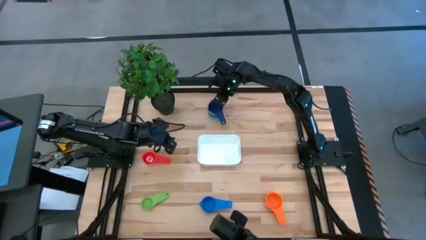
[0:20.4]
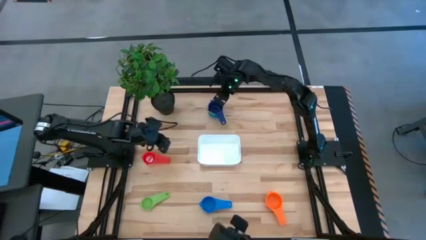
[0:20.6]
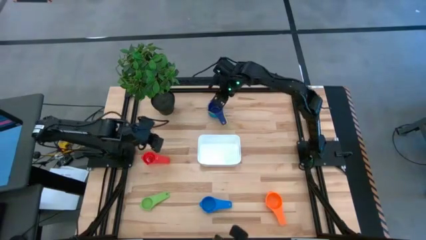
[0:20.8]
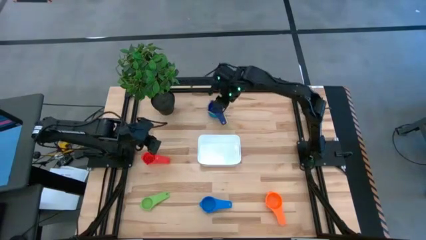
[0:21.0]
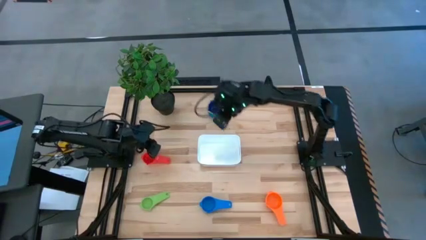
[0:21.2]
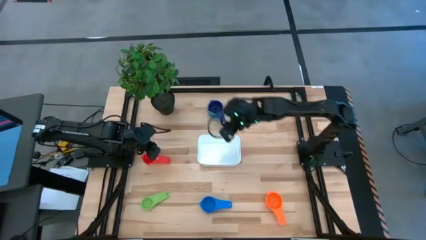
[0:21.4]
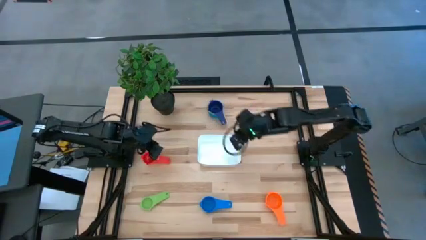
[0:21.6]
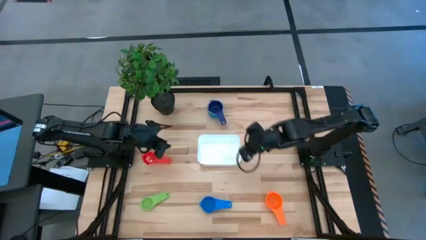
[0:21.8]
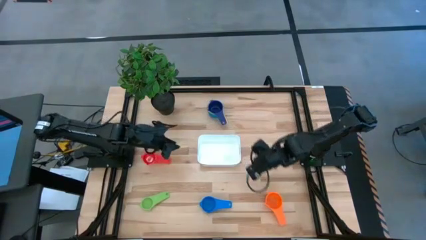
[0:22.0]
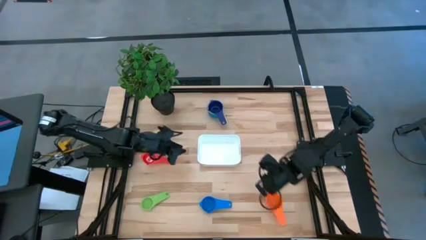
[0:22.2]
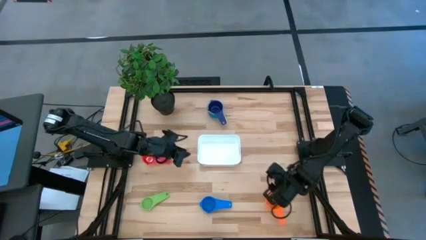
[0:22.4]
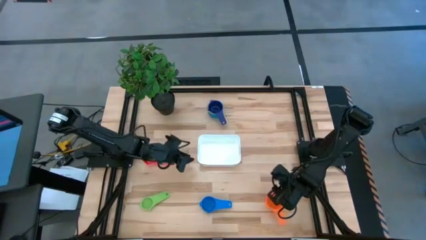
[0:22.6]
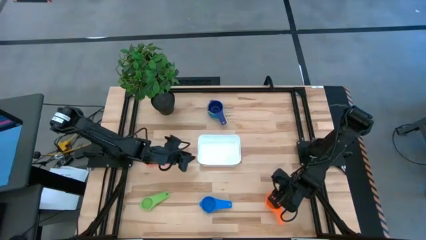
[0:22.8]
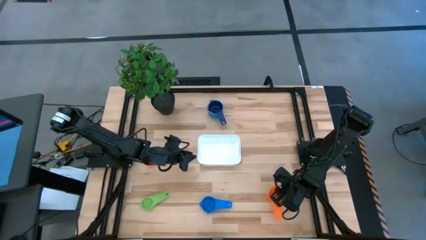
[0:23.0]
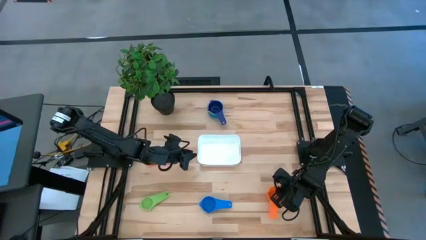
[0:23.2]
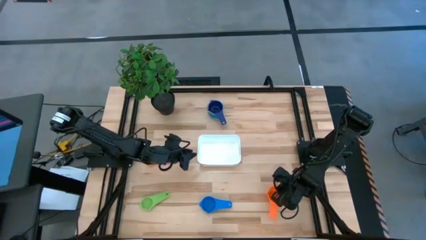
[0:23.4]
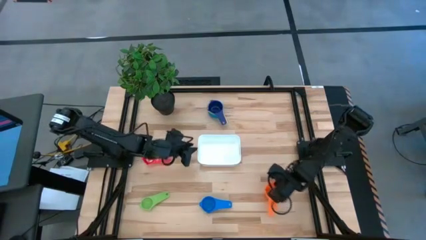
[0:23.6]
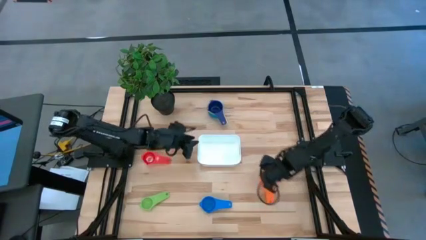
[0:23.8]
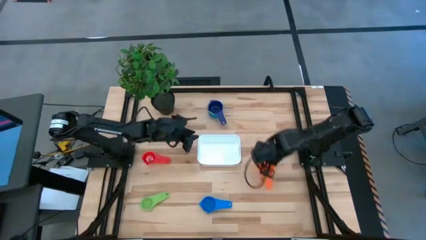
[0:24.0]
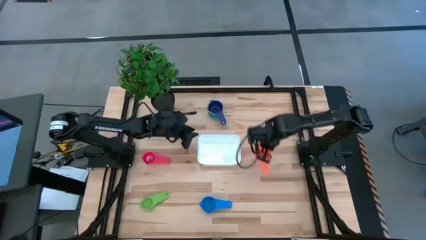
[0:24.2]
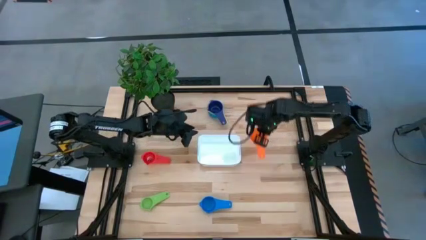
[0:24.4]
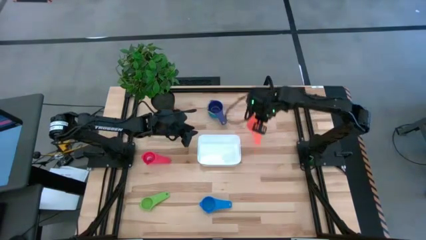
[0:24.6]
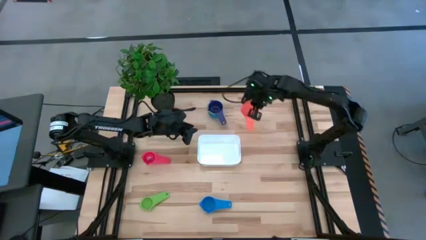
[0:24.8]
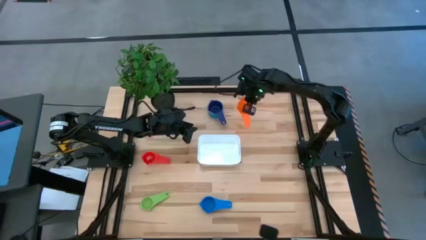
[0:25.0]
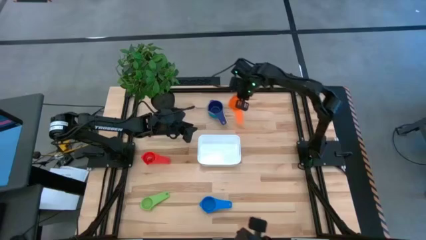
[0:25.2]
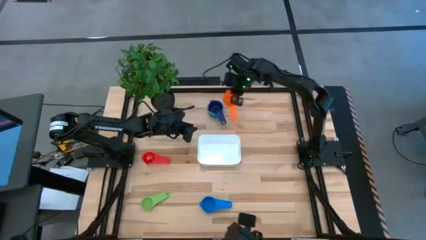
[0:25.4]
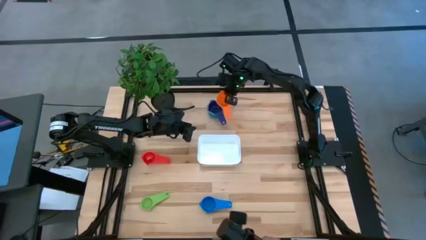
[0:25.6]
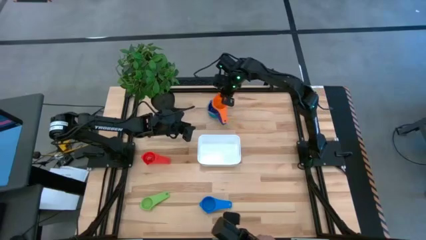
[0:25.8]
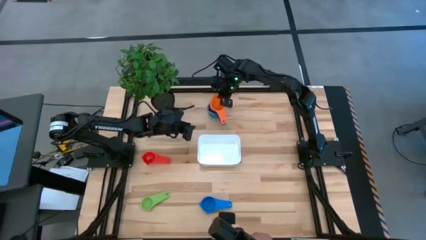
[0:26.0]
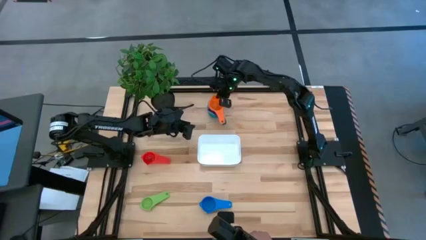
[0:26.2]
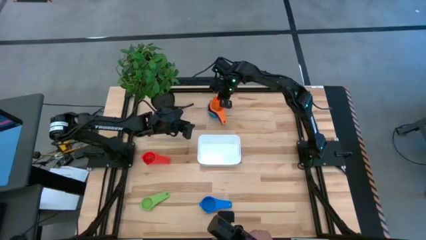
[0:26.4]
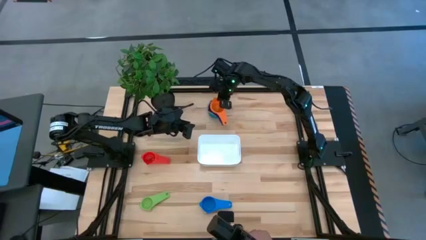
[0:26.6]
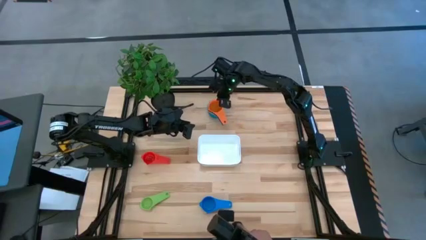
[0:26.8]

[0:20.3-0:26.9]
Task: Nest measuring cups in basket
Stack the orange measuring cup on top of the dark blue measuring cup

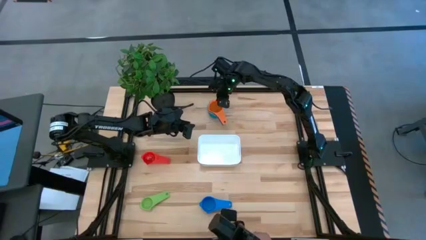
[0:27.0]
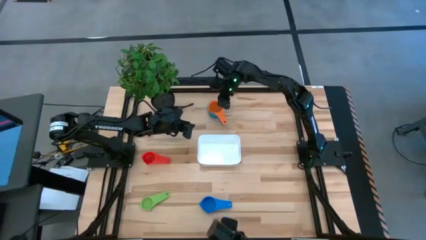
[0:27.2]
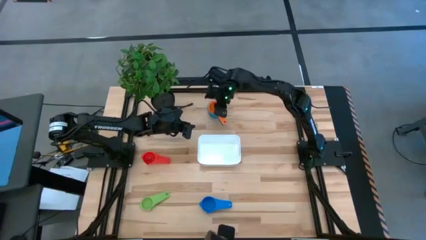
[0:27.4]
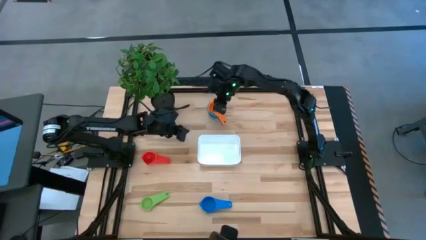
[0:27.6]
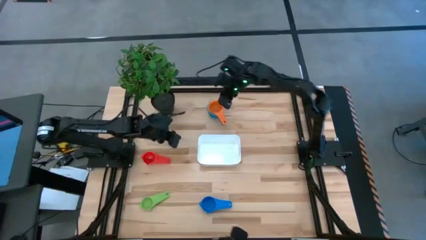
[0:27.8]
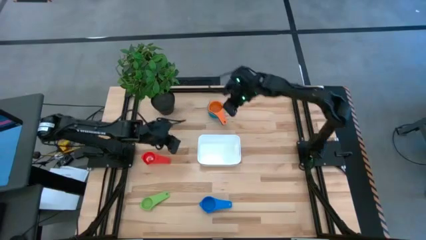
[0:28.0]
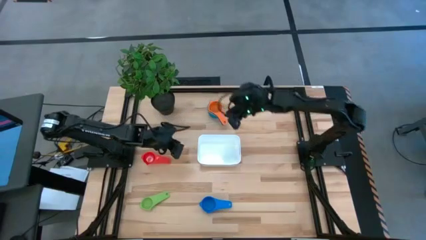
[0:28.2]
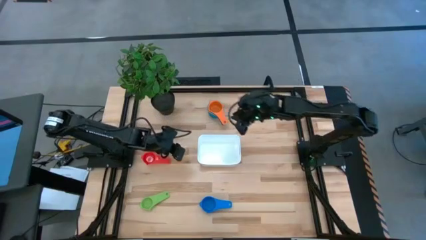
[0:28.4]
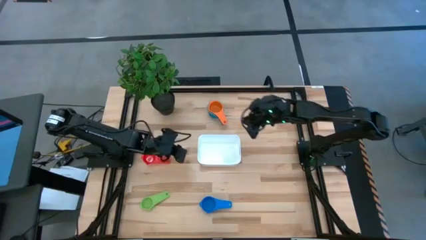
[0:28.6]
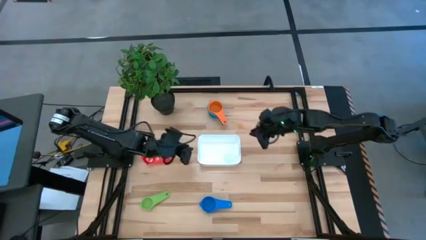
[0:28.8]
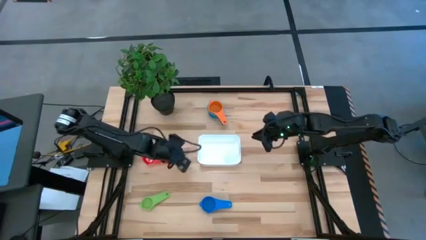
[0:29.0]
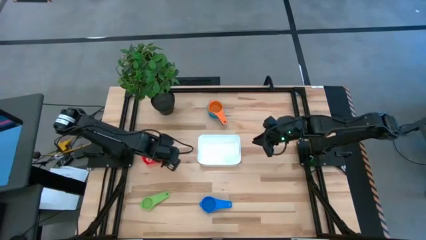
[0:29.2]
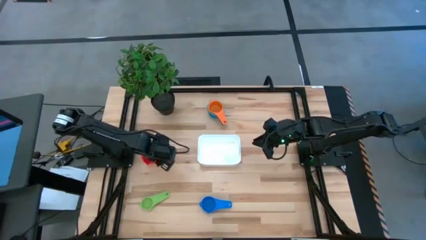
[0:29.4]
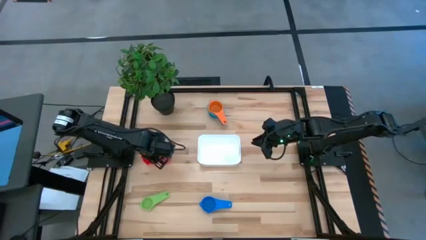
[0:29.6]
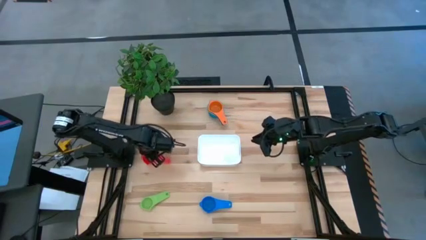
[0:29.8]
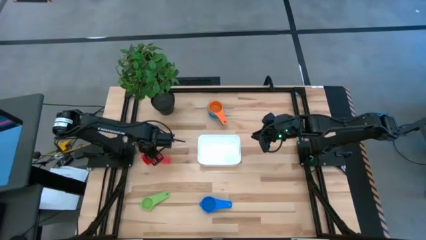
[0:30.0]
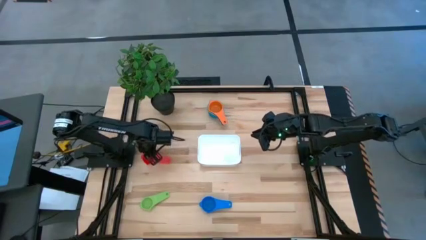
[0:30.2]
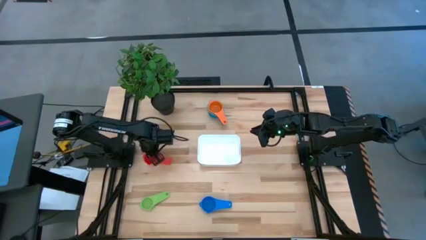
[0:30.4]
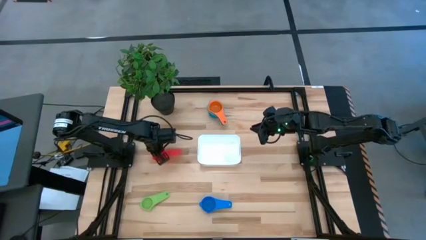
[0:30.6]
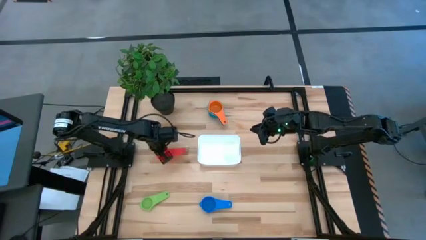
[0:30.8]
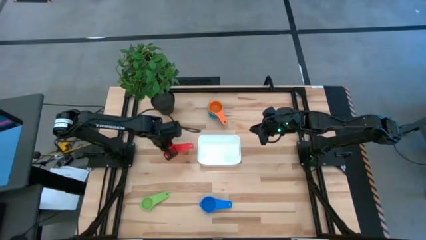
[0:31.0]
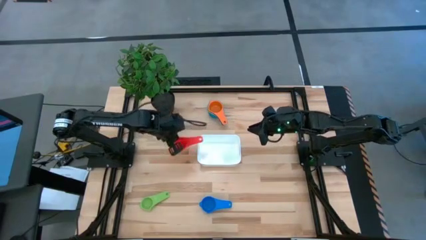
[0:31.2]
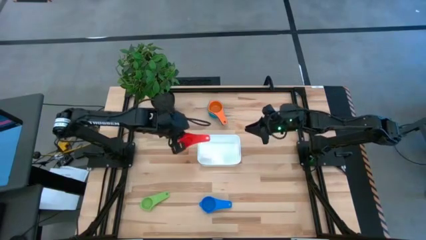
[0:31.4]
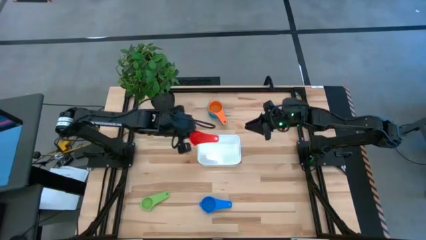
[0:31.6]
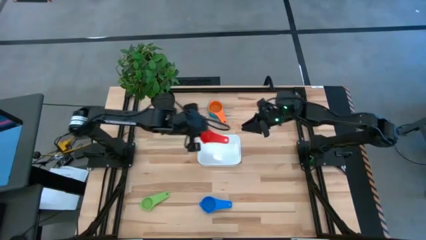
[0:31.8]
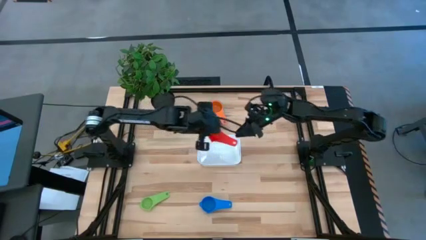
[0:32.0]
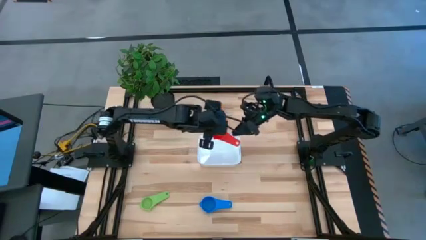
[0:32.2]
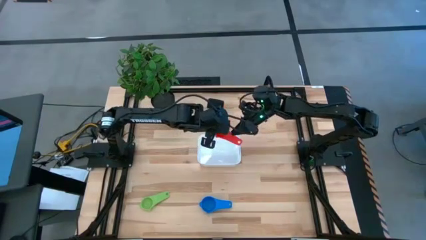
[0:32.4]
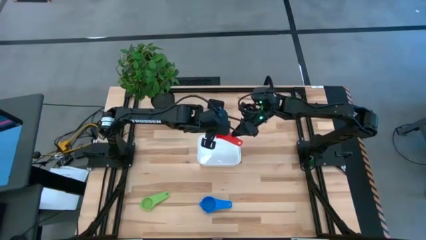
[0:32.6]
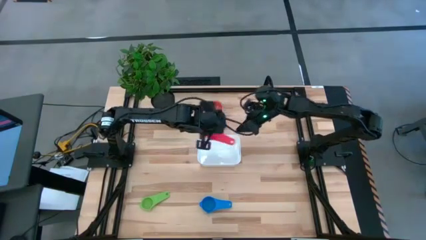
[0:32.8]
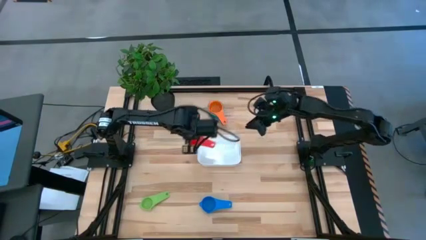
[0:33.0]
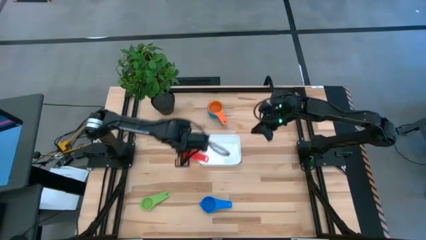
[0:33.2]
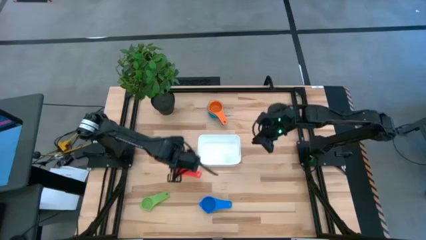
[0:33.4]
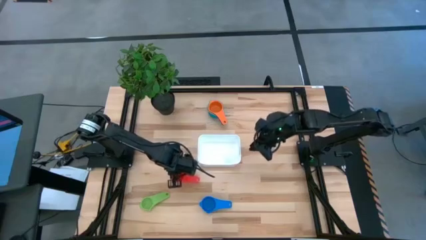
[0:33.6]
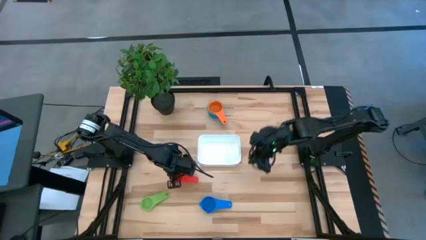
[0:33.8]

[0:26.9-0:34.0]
Stack the red measuring cup on top of the orange measuring cup

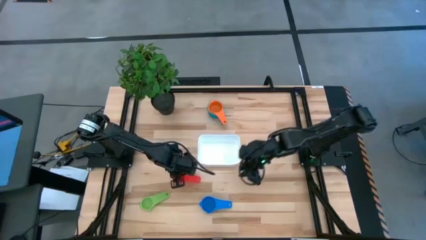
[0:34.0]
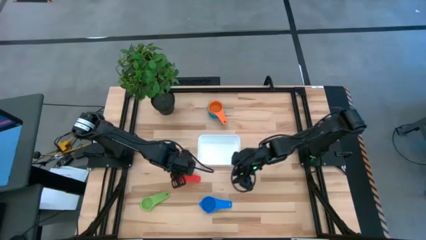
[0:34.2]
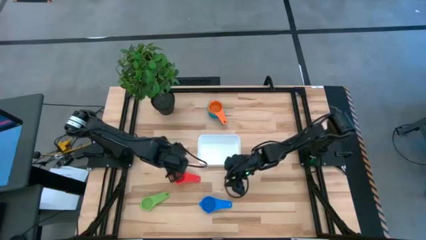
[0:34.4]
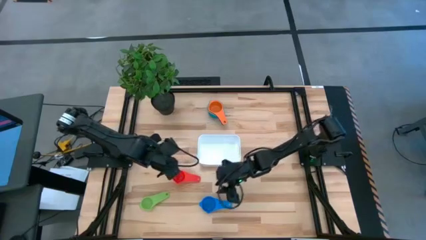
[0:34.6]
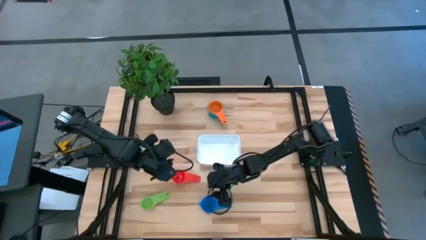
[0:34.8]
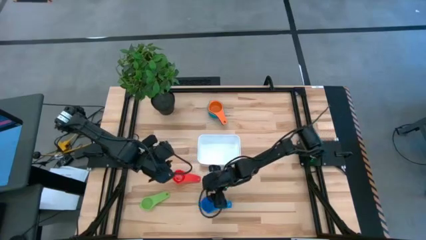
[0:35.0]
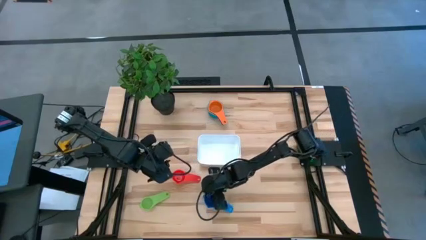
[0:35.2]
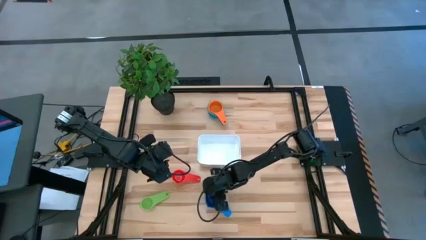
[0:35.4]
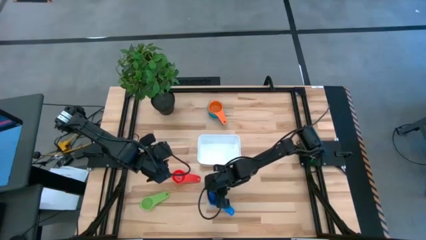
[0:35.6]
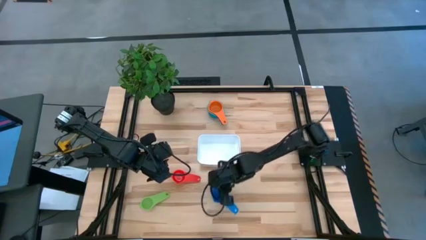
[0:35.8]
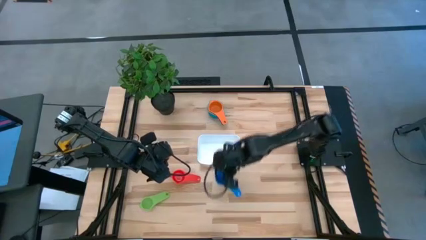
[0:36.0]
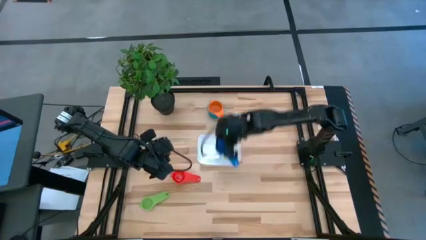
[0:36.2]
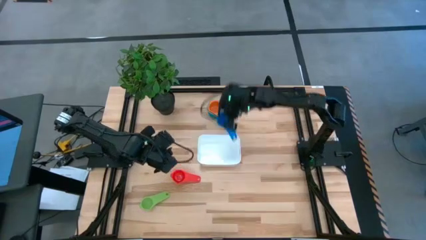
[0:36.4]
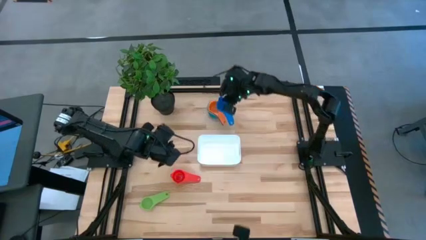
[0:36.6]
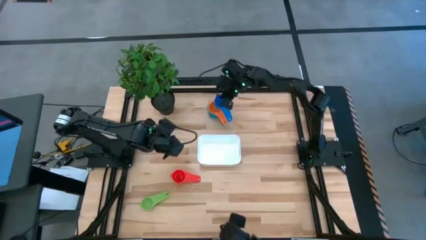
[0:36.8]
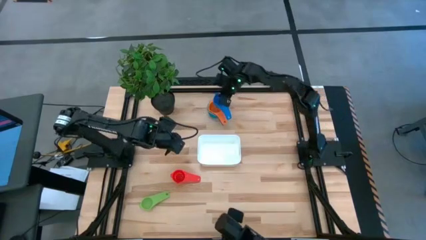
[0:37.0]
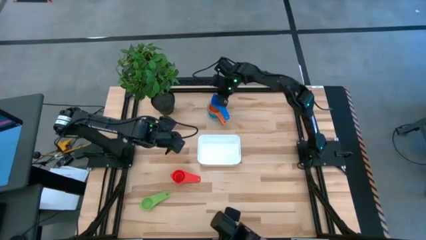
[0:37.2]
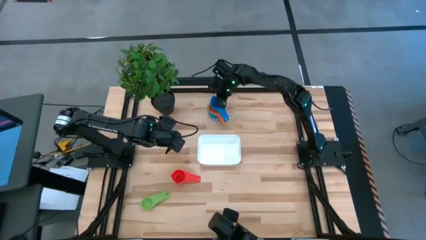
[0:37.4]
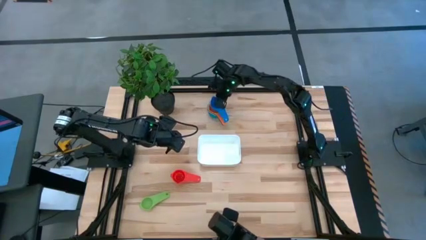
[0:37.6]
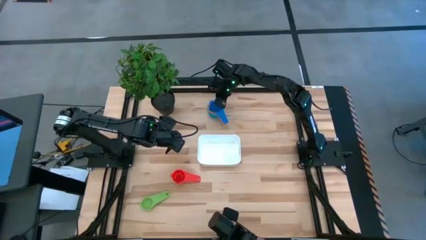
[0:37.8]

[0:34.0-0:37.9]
Stack the blue measuring cup on top of the orange measuring cup
